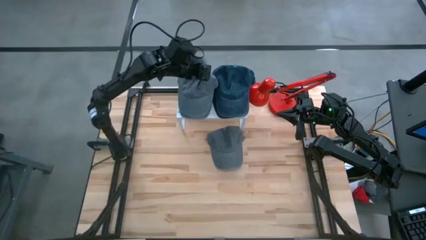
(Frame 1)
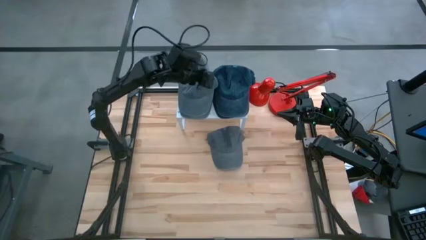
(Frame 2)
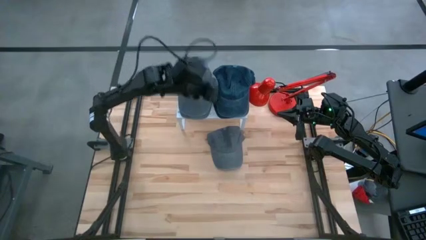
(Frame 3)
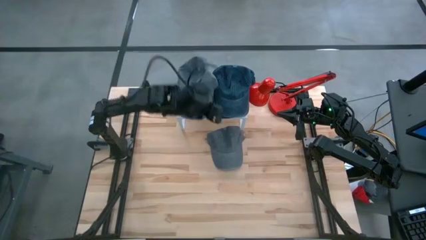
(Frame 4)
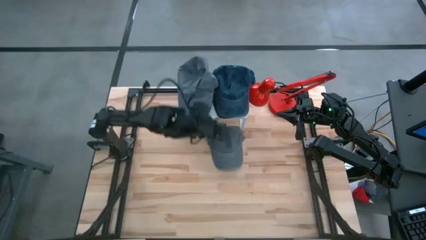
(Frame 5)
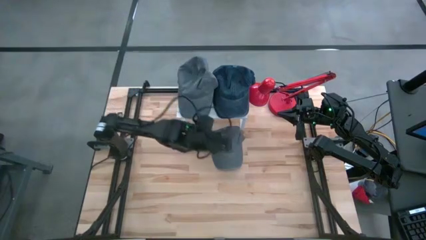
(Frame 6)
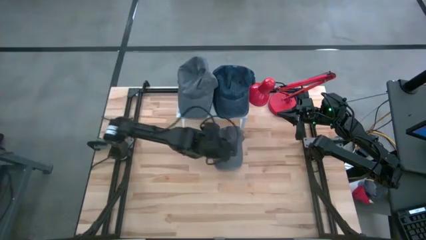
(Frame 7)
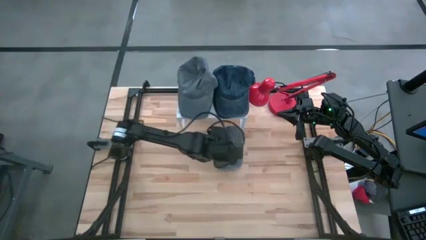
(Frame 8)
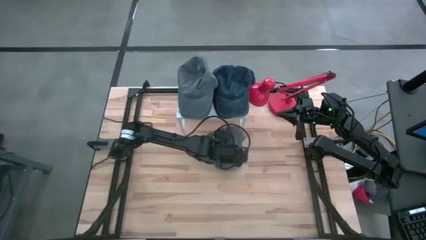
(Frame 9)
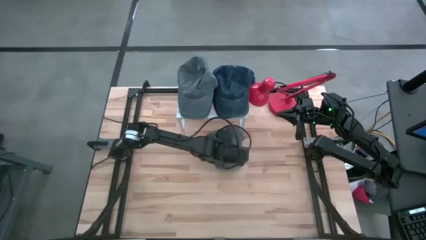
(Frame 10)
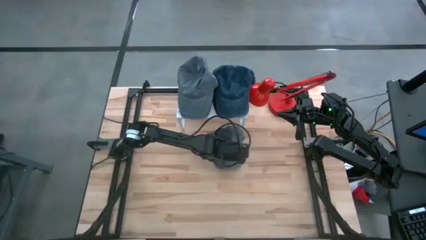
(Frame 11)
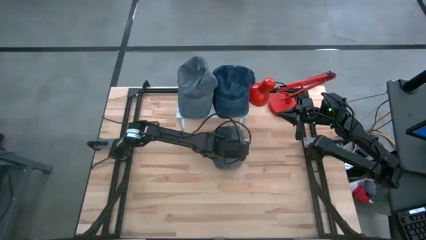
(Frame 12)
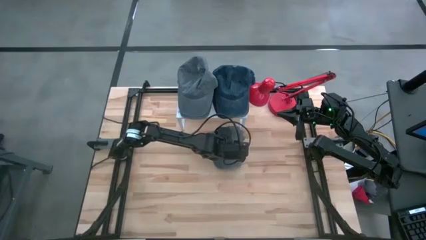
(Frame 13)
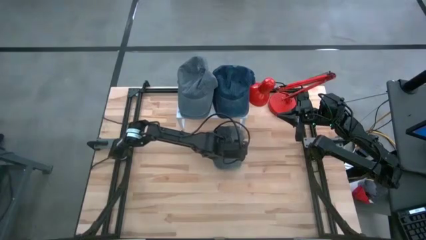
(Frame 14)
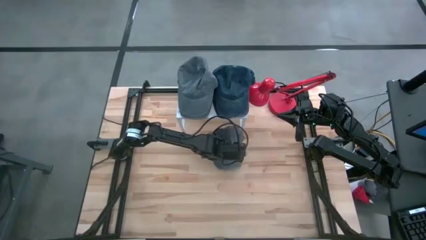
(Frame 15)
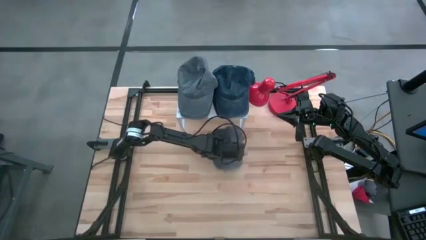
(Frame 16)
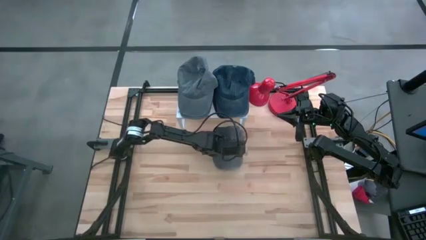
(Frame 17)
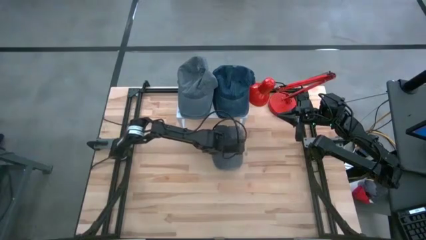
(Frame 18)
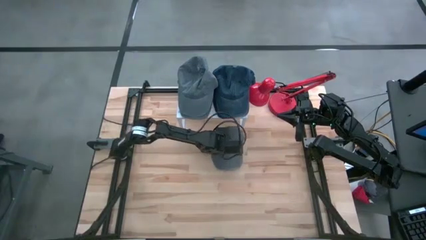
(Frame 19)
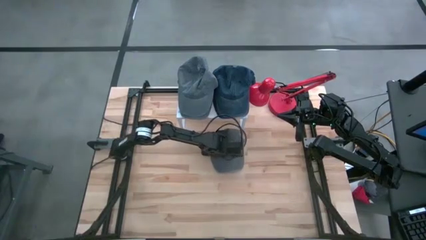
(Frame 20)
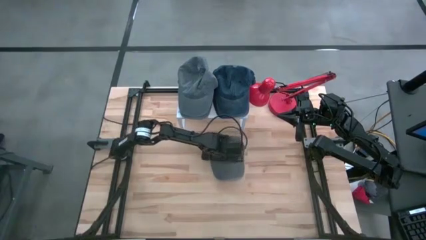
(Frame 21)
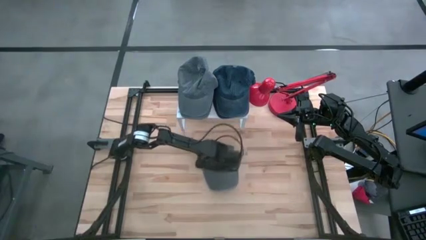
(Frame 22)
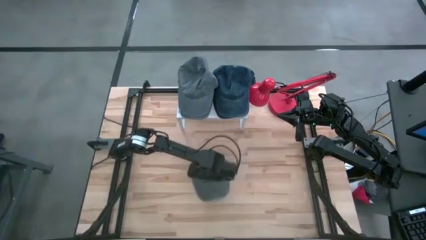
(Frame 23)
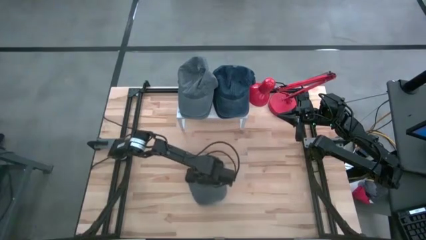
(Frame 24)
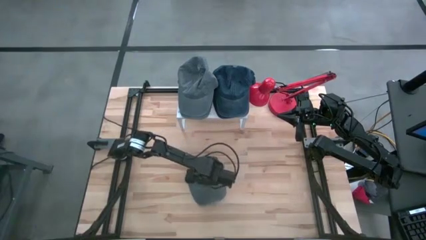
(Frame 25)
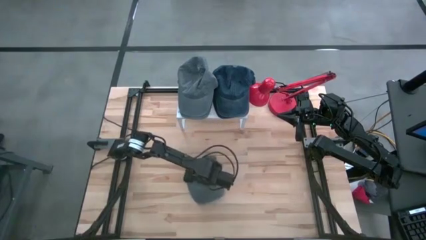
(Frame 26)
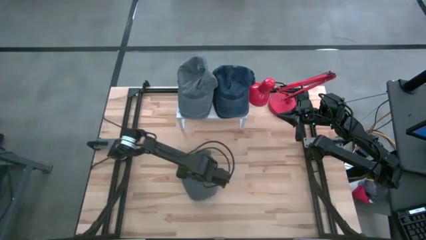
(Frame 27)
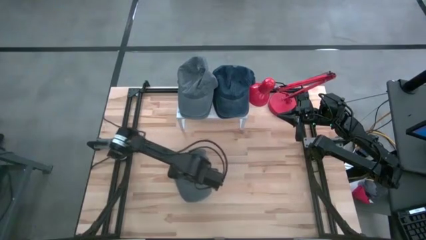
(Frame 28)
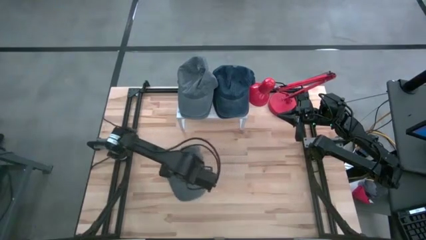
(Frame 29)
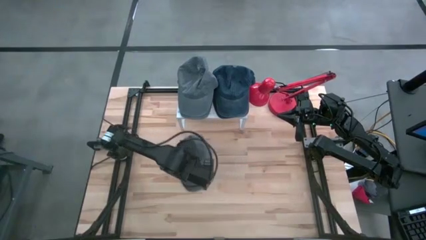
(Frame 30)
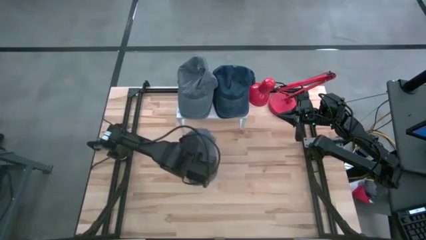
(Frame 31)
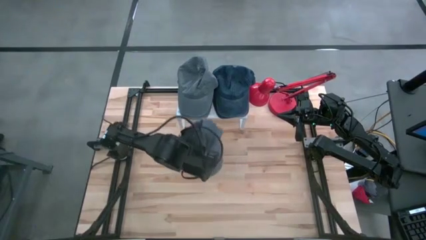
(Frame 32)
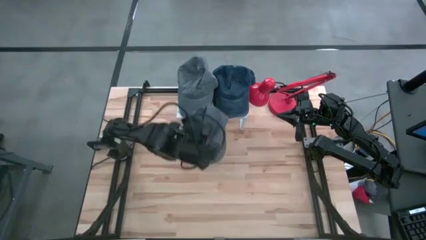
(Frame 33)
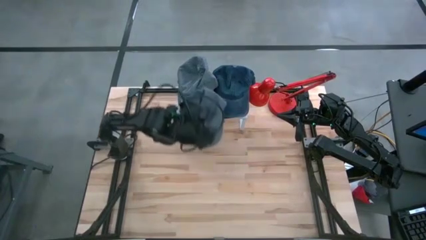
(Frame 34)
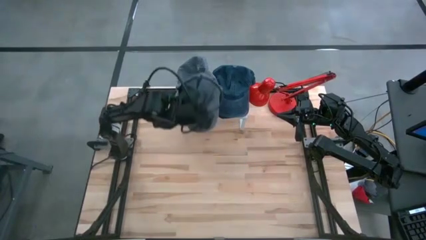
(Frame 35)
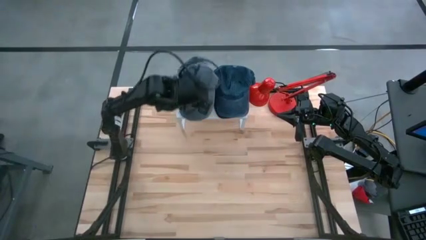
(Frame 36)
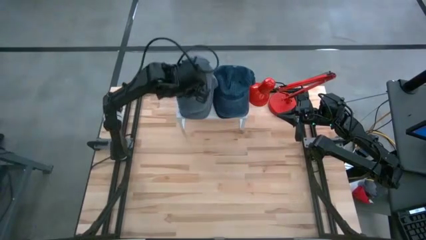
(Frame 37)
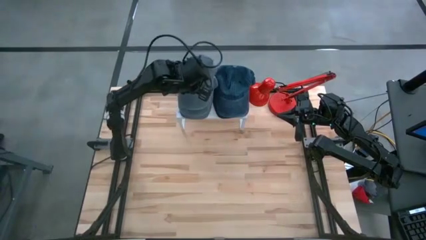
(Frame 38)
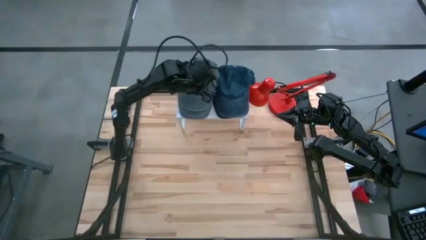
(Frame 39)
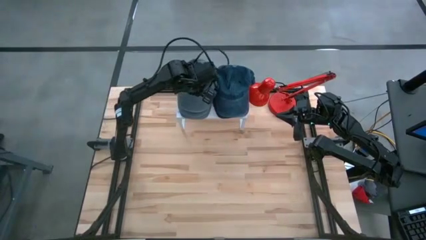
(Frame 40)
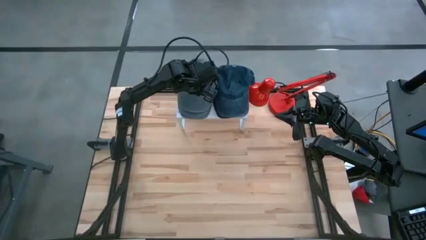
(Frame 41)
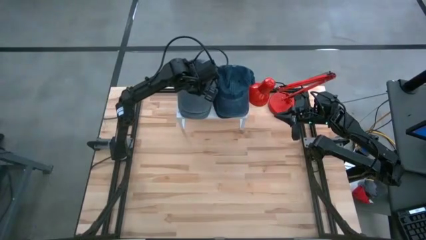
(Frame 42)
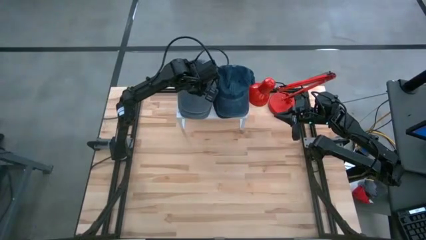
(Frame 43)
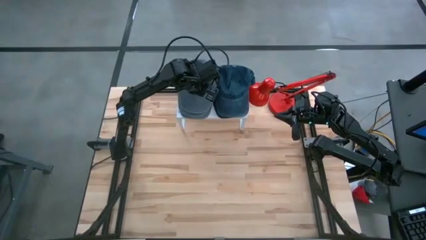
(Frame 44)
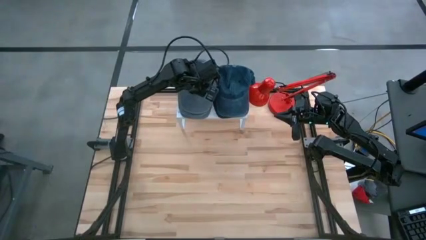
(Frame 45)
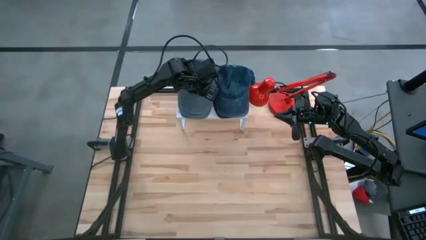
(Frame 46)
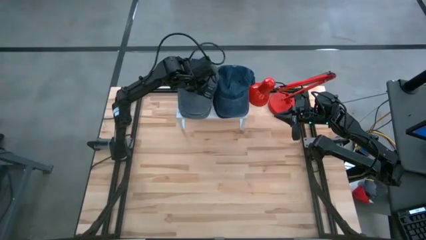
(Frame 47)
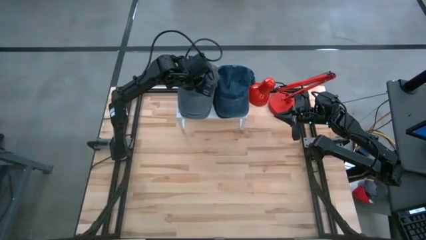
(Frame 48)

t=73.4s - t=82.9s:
Task: Pick & Place hat
Stack the bottom light gray cap on the top of the other light gray cap on the shelf

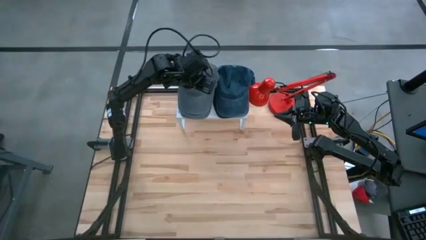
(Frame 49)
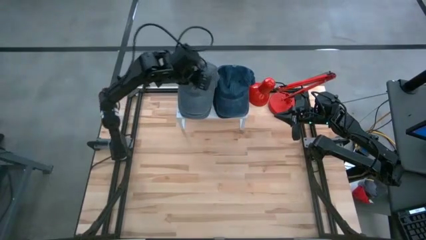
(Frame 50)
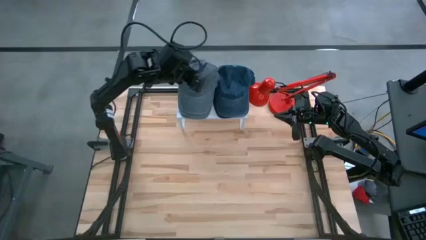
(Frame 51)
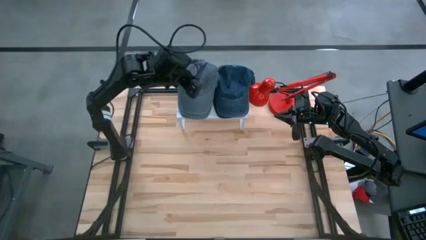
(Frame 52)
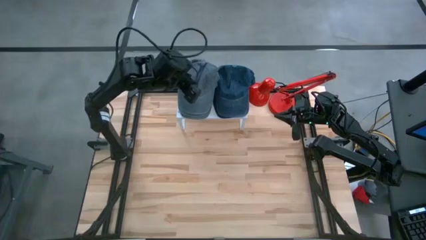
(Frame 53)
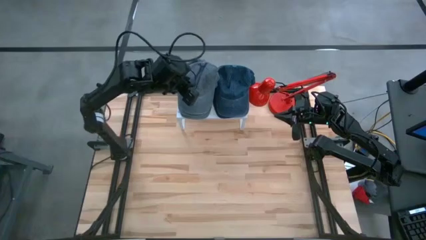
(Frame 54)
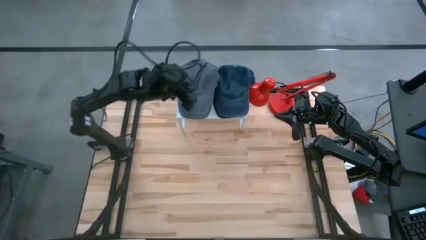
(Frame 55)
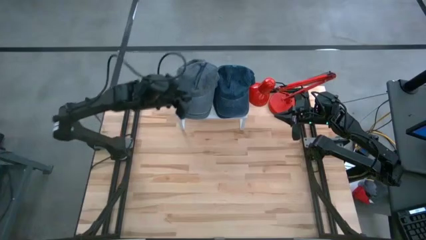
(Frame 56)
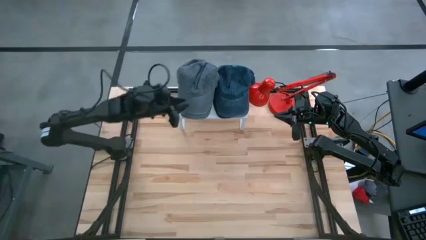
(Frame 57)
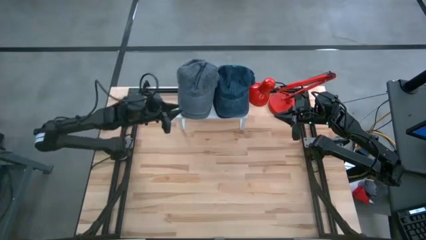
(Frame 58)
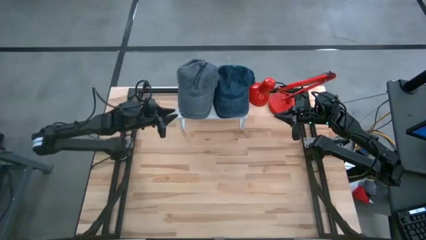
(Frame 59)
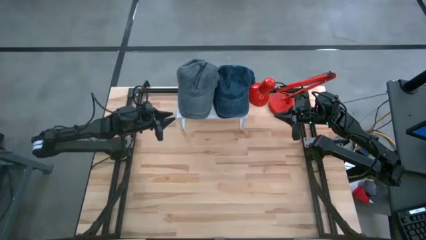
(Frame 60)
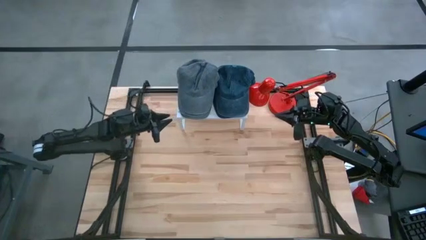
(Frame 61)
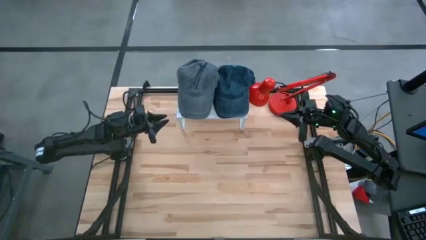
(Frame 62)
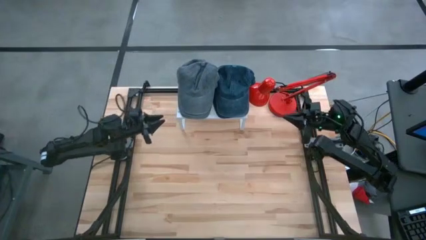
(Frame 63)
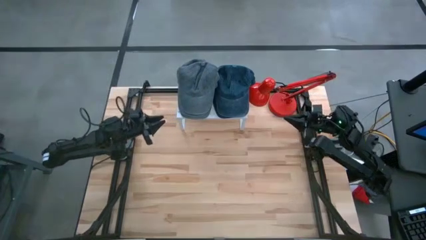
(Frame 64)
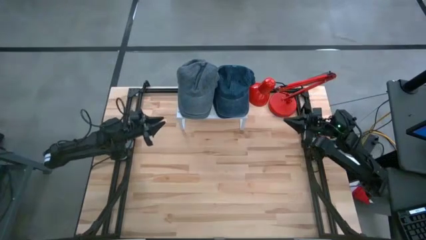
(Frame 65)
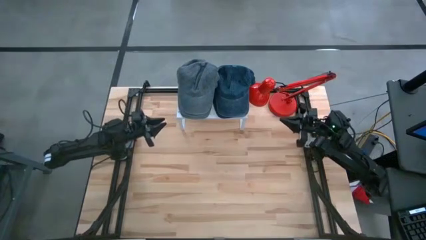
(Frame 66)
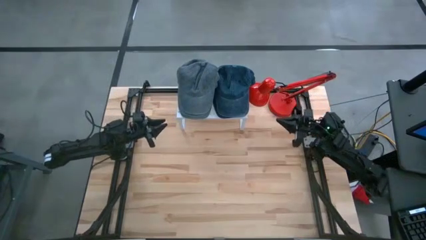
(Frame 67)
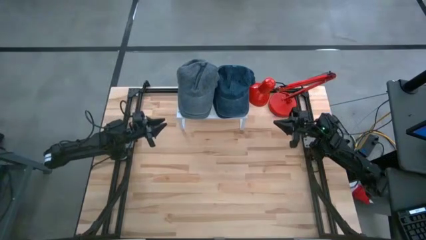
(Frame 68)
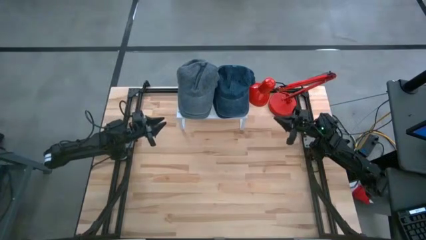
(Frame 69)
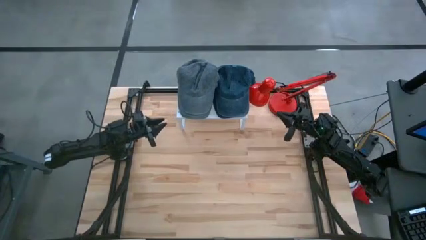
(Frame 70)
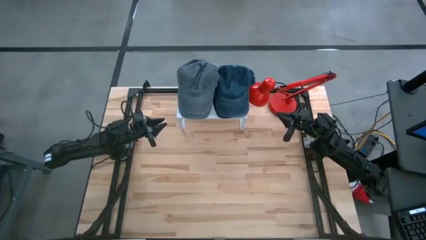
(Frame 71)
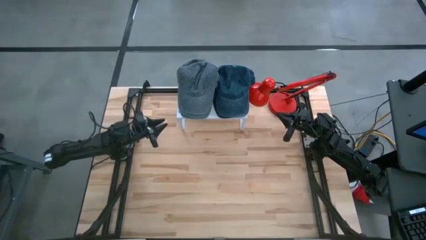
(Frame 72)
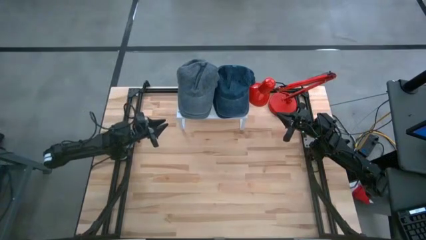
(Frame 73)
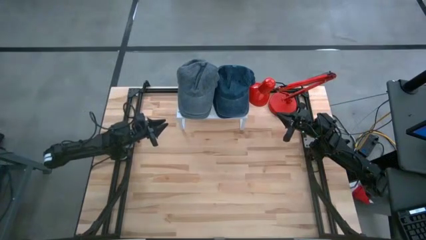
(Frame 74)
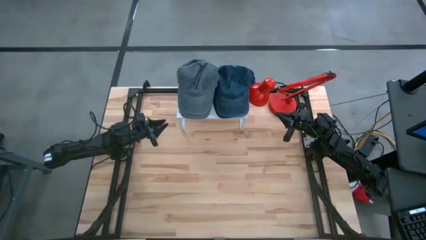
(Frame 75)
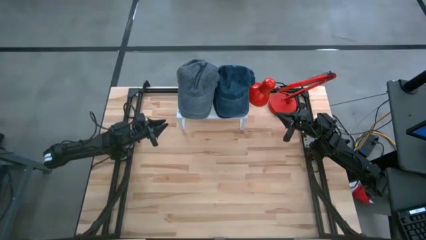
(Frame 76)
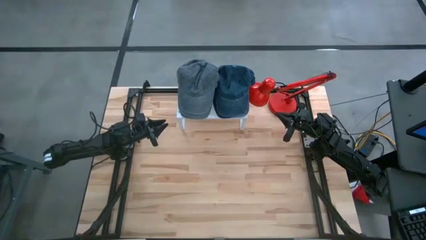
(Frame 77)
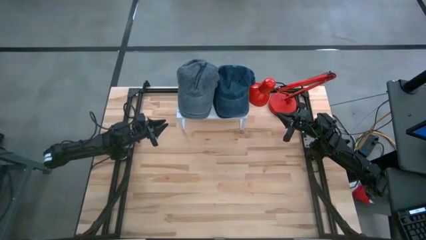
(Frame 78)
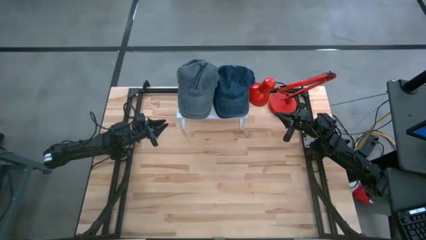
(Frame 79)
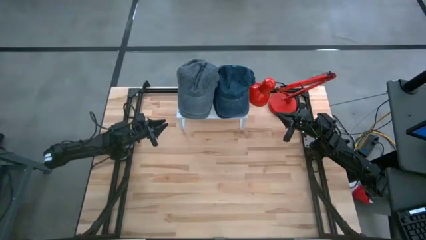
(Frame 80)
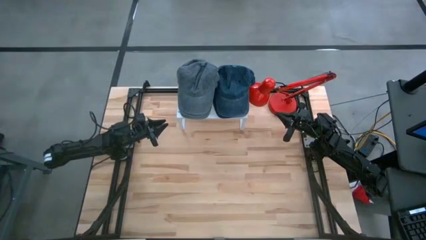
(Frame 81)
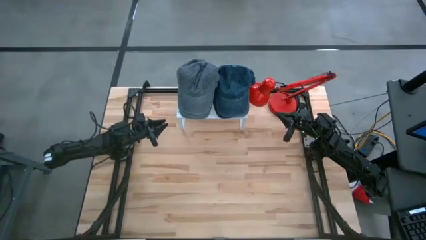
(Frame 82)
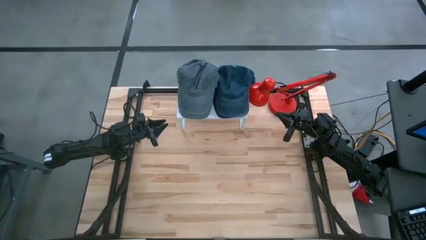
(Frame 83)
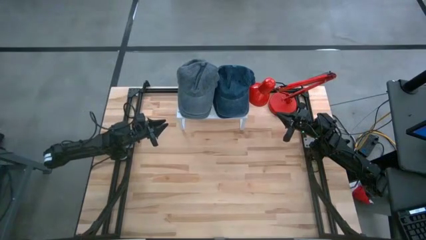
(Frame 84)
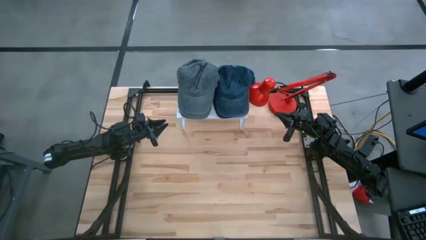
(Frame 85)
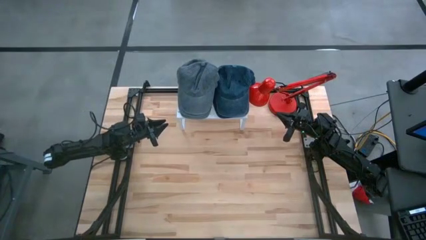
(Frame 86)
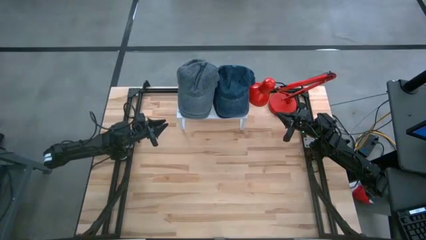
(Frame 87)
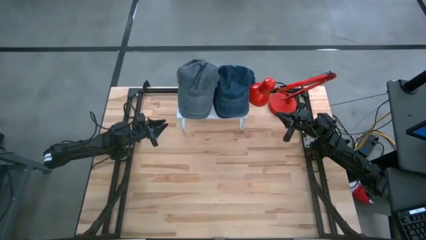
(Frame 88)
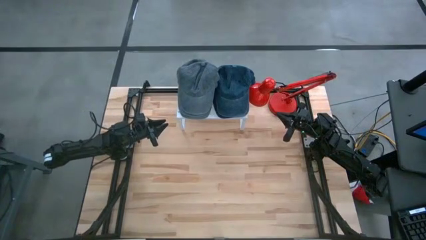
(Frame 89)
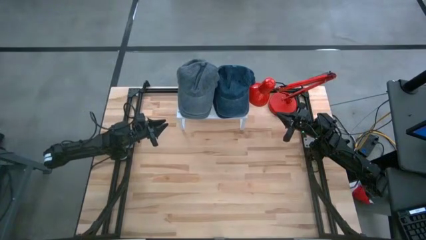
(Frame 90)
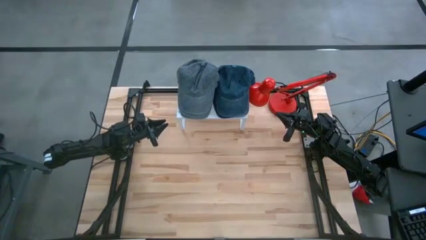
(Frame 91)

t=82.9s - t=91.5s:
Return to Home Position
